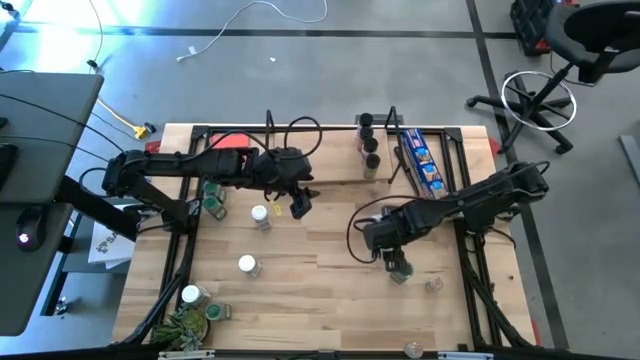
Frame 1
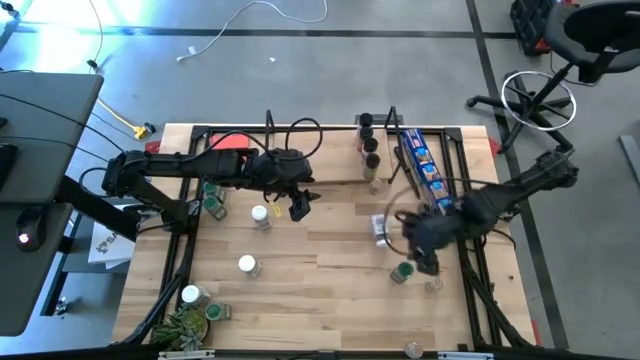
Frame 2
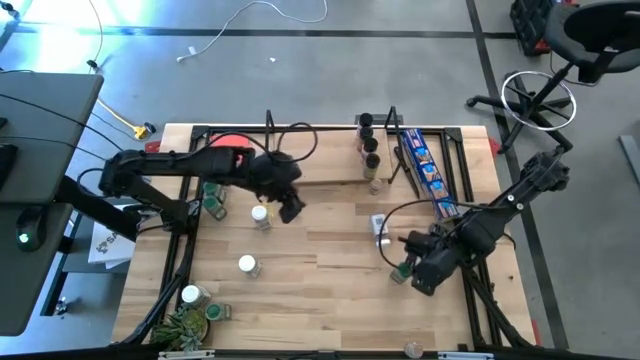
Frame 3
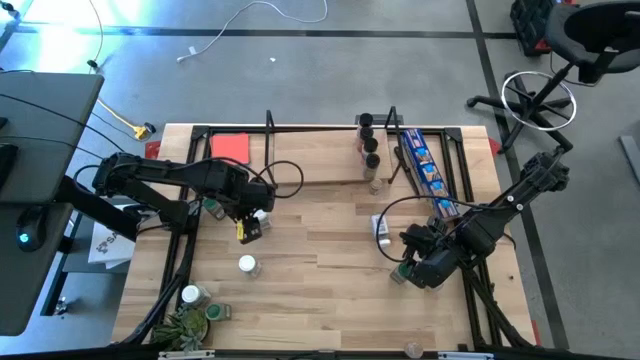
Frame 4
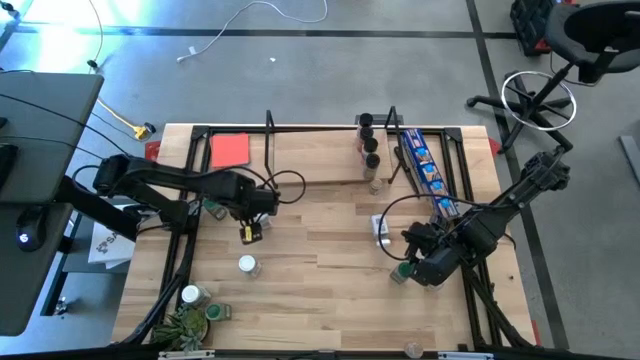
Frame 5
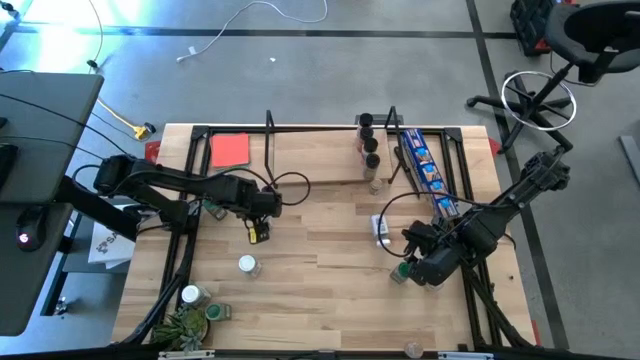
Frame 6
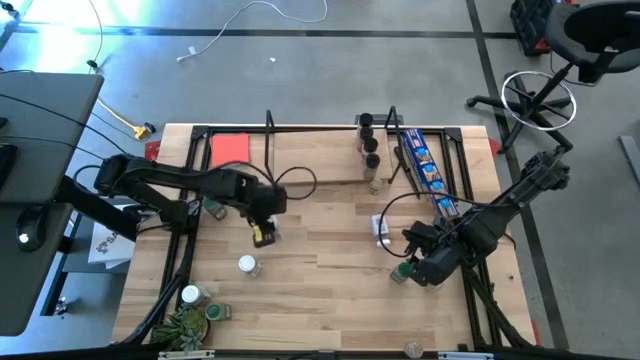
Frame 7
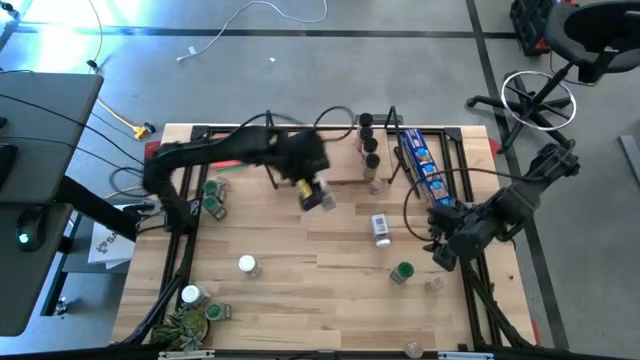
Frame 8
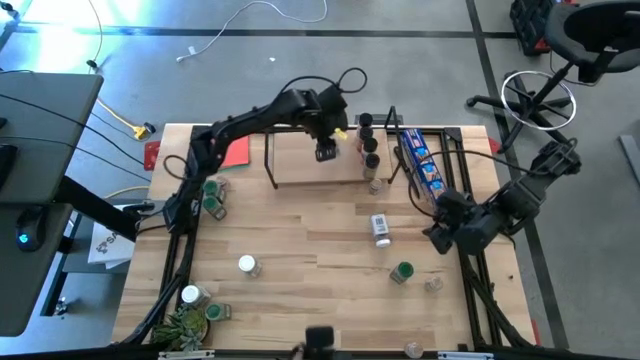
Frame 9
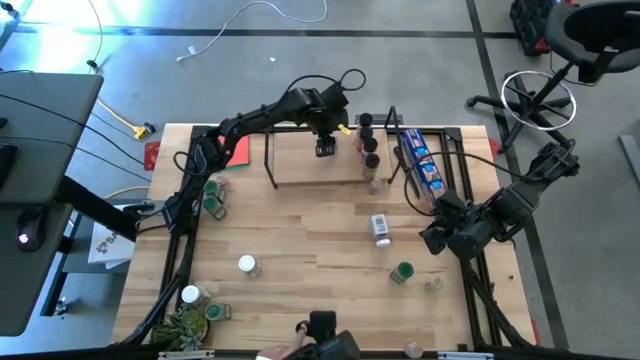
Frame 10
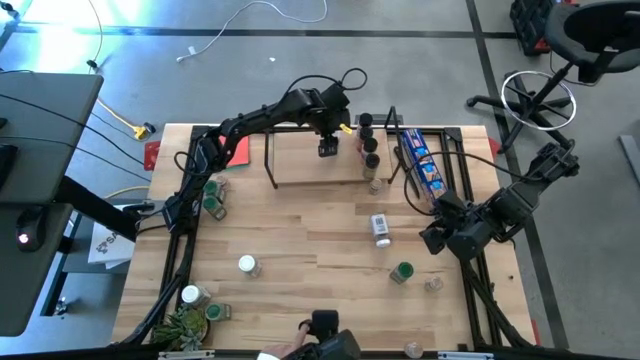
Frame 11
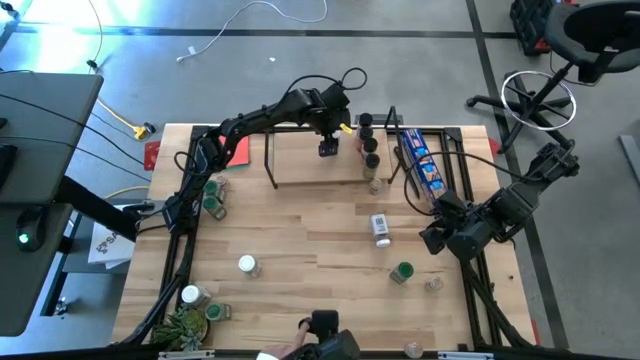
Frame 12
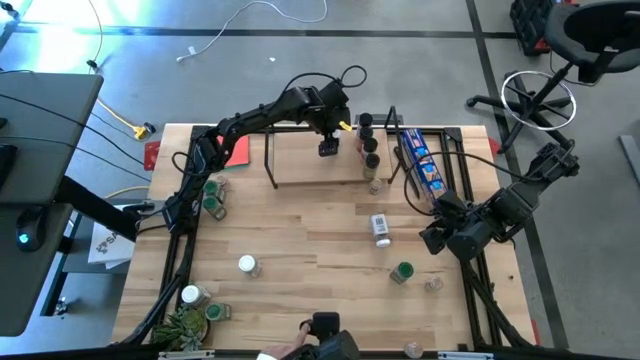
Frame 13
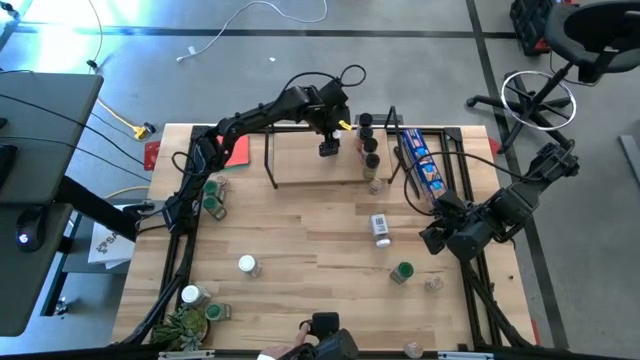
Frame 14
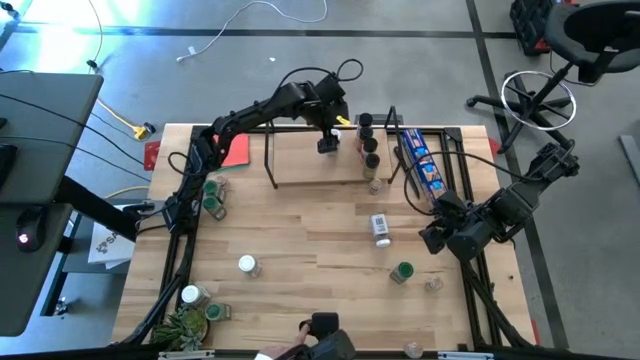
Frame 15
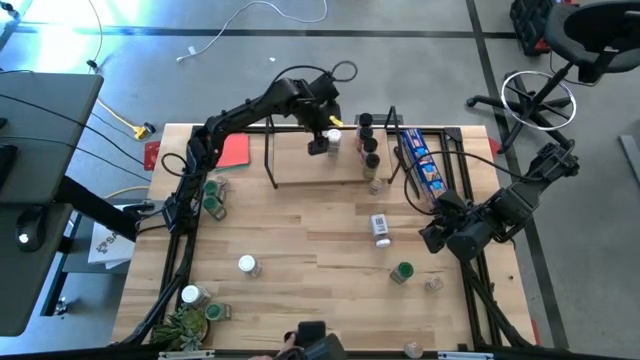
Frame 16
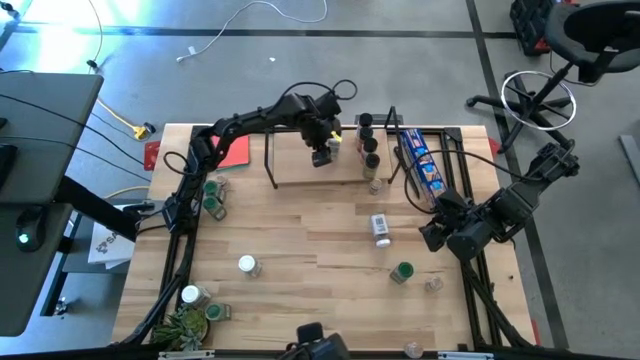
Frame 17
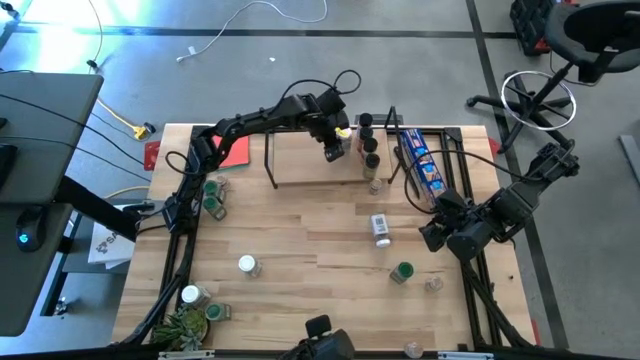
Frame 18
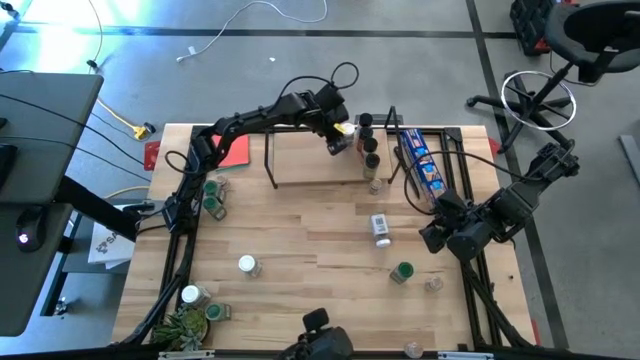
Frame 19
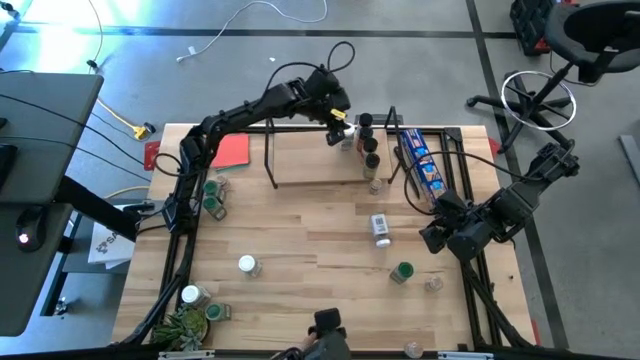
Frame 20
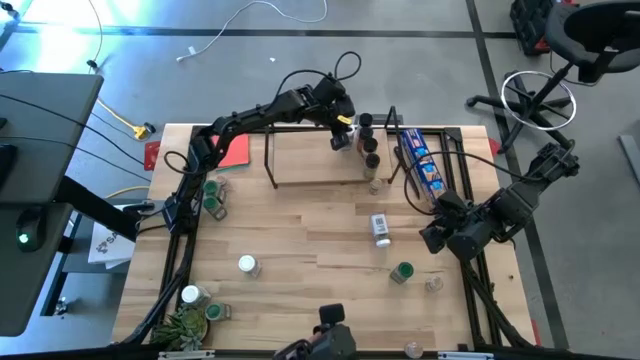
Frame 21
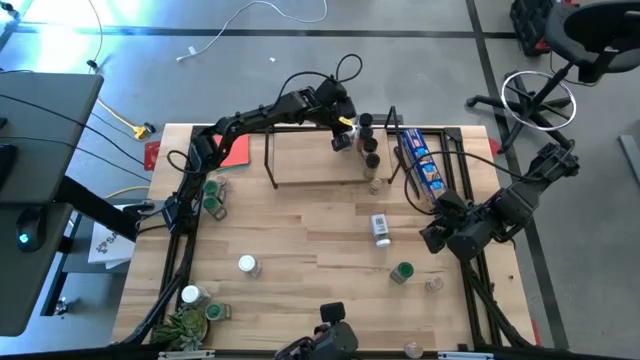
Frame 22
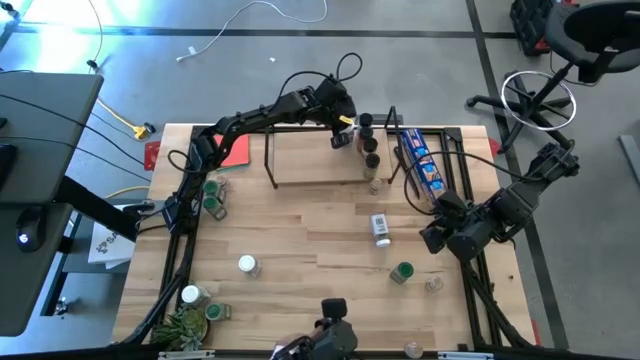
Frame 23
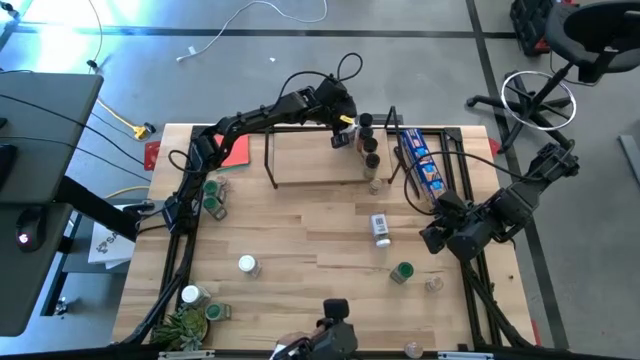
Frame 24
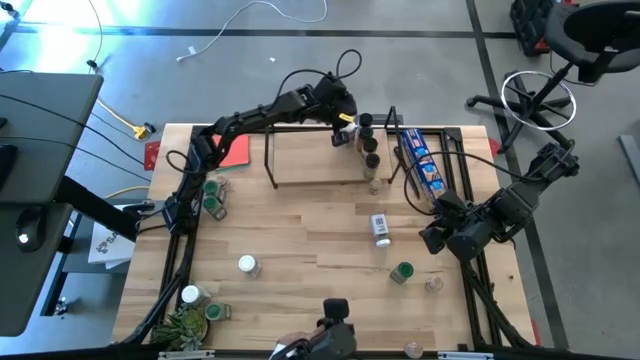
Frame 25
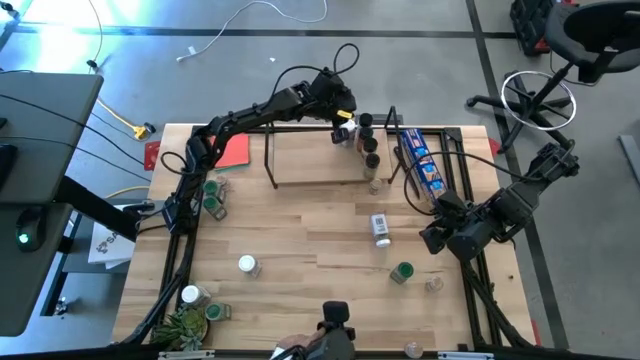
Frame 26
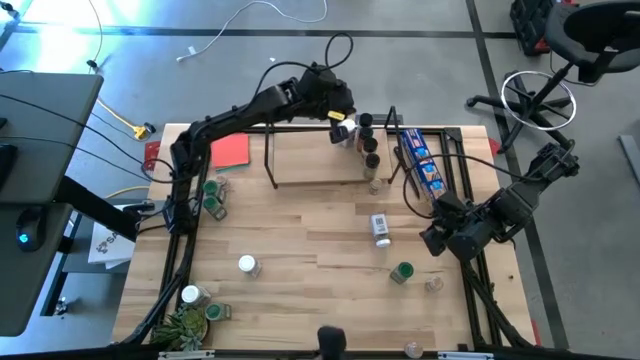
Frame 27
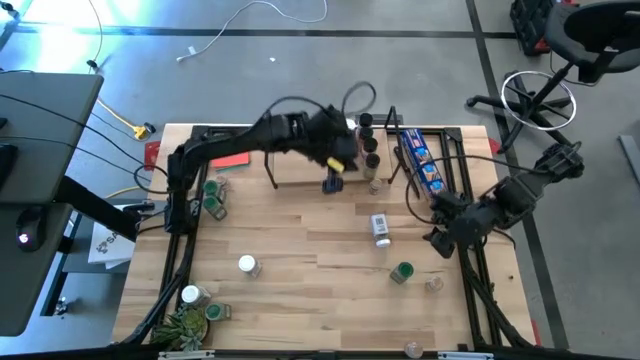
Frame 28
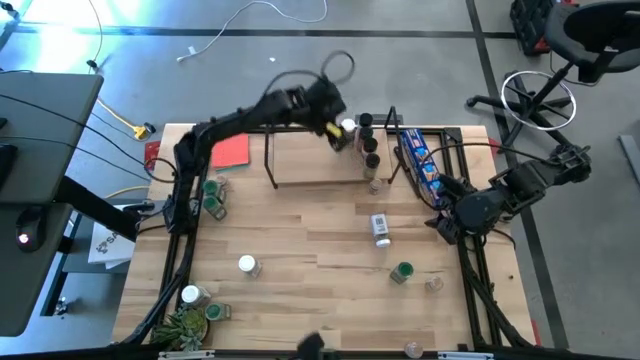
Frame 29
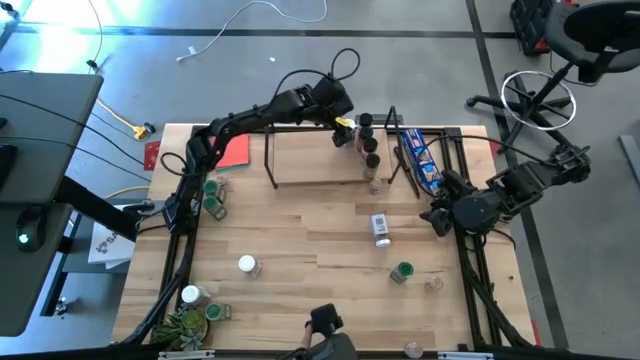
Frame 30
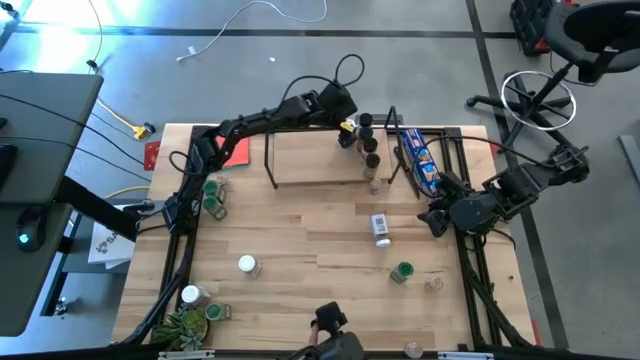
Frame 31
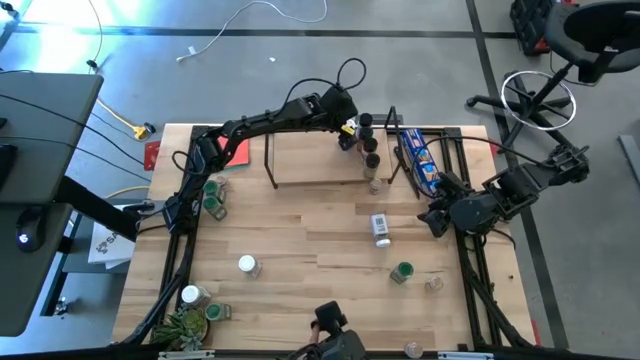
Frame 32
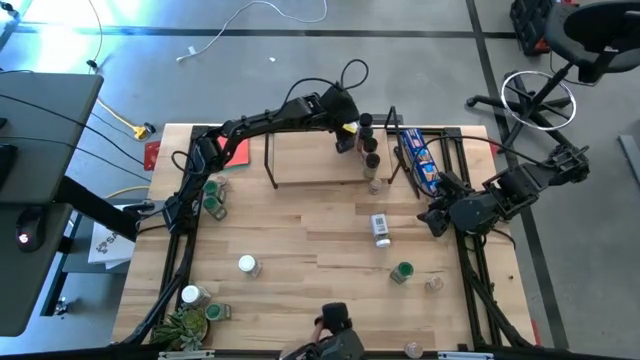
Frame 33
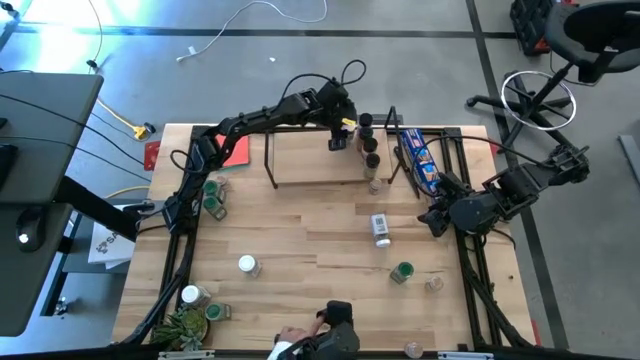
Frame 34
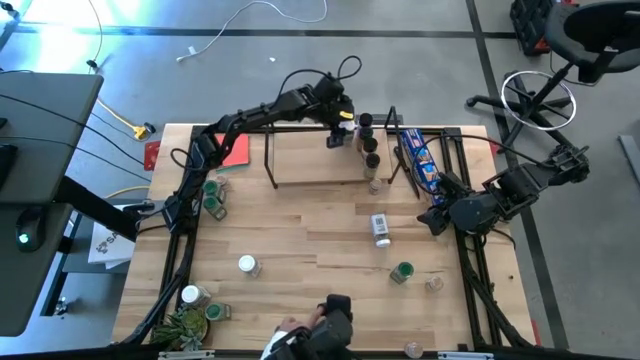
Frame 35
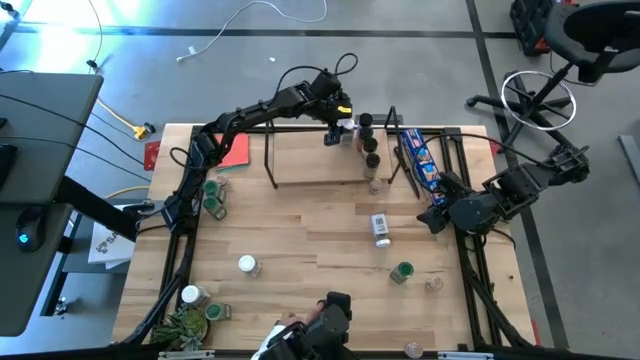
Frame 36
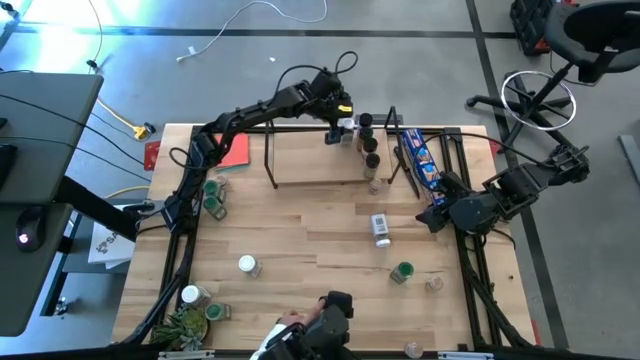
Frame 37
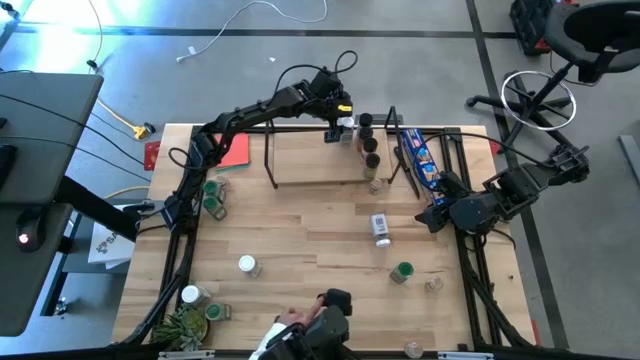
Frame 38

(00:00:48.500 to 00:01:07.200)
Task: Shelf spices
Put the top left white seasoning bottle on the shelf

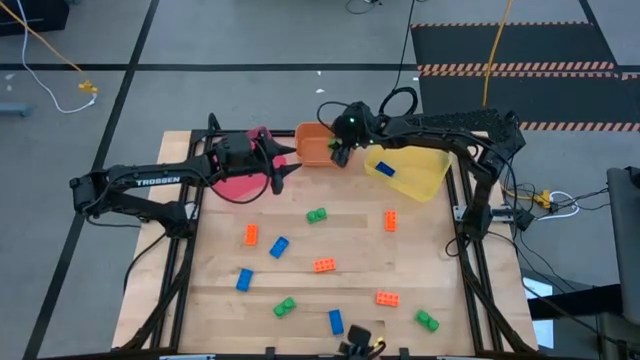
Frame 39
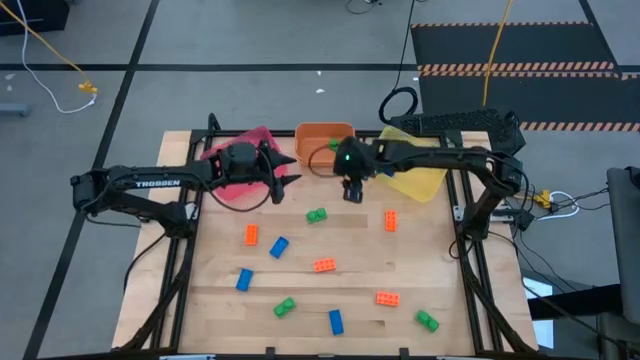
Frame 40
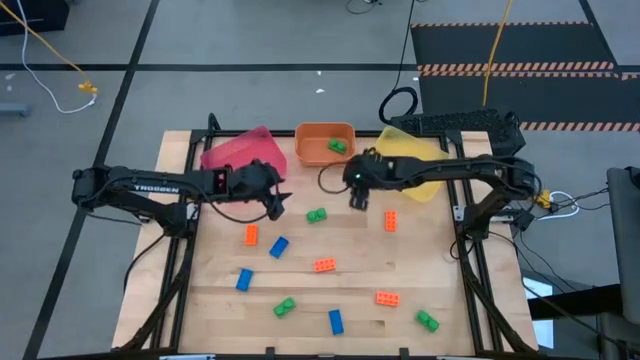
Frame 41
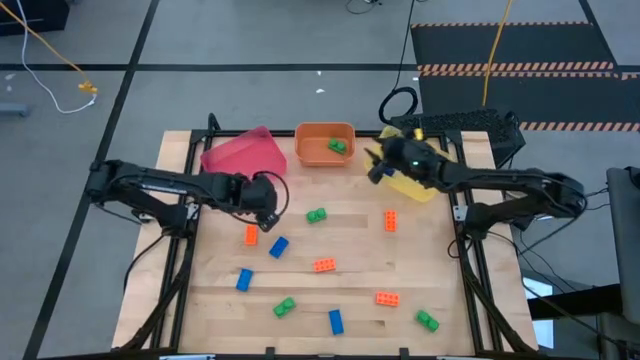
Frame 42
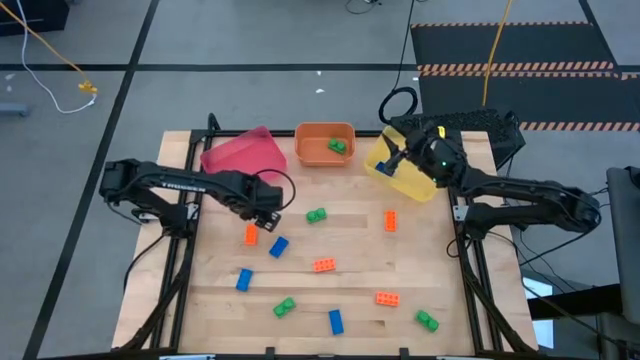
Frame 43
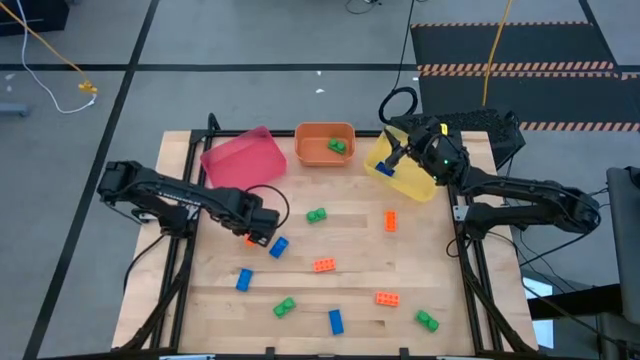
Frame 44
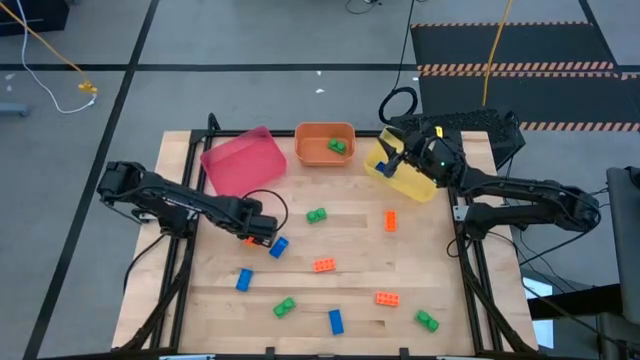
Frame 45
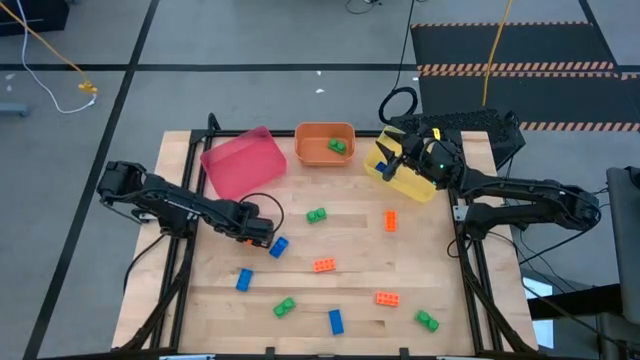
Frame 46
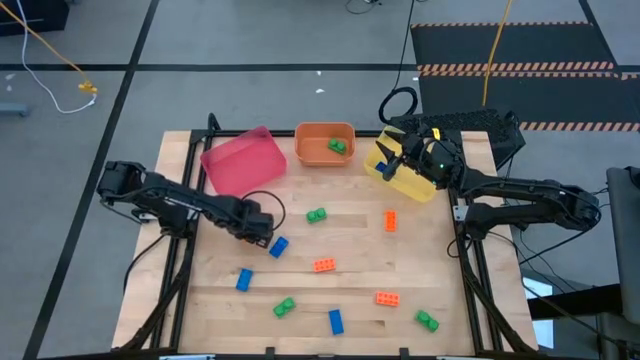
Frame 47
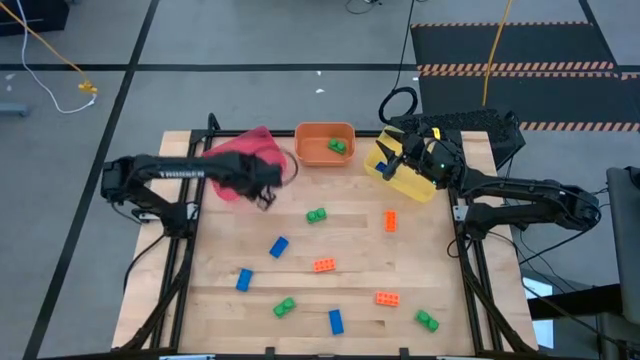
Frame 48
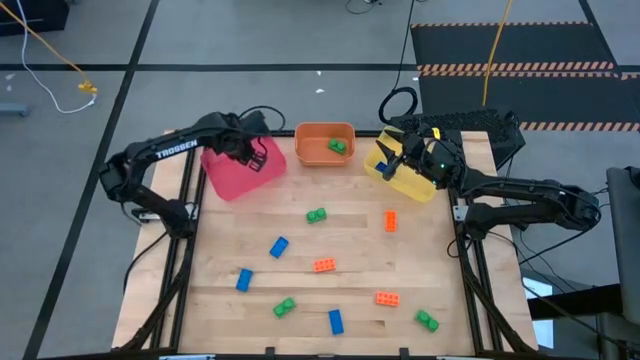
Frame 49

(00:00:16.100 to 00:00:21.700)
Task: Sort & place blocks by color
Put the orange game piece into the pink bin
